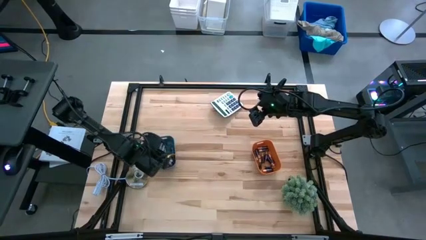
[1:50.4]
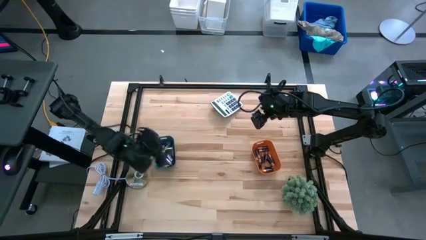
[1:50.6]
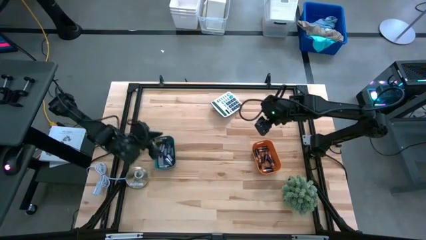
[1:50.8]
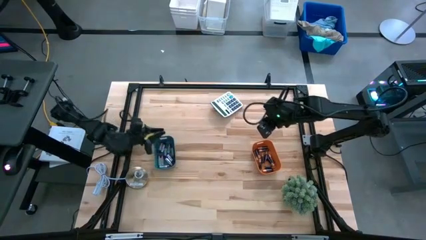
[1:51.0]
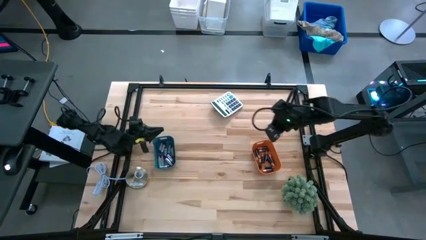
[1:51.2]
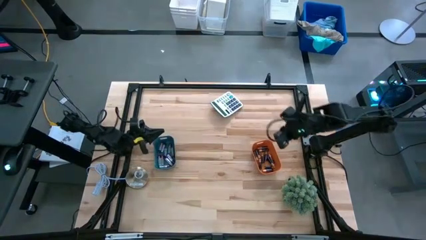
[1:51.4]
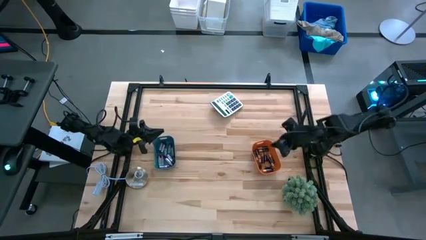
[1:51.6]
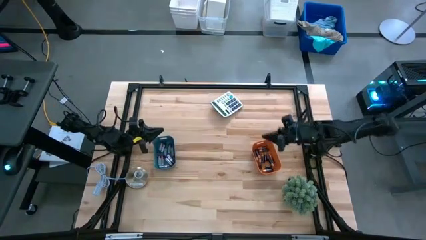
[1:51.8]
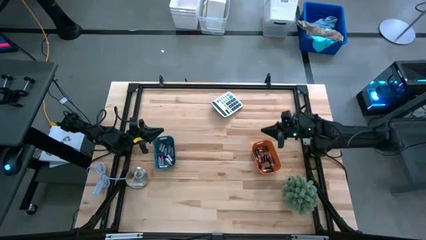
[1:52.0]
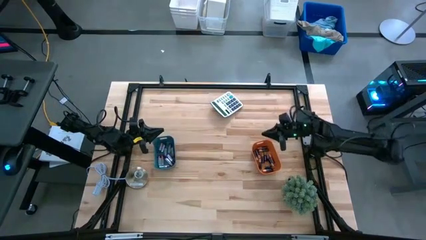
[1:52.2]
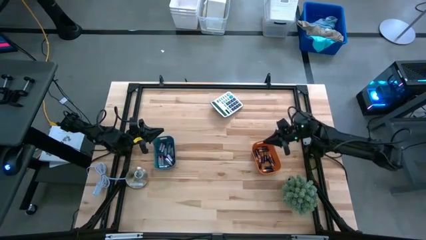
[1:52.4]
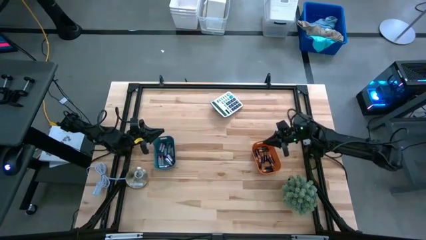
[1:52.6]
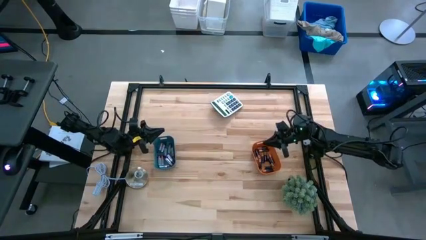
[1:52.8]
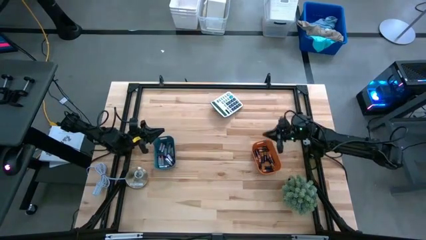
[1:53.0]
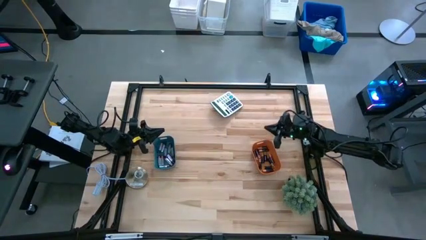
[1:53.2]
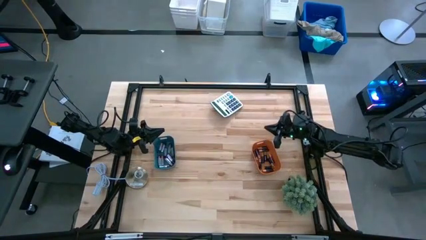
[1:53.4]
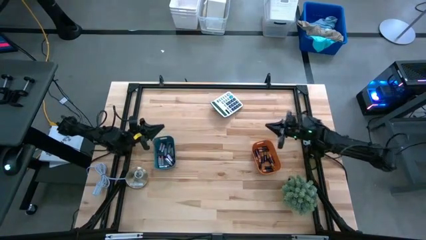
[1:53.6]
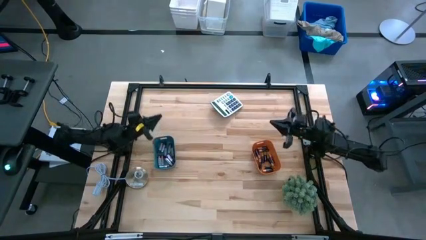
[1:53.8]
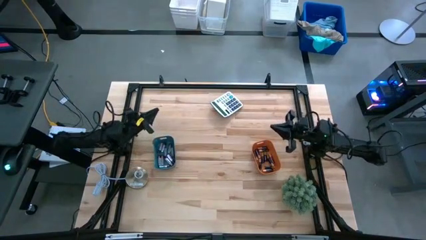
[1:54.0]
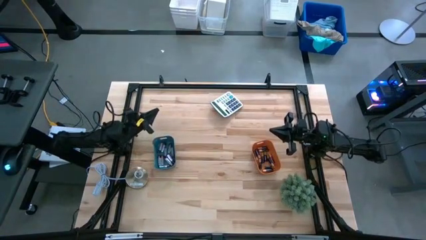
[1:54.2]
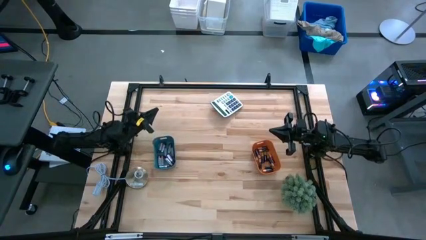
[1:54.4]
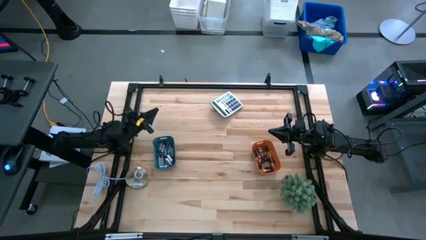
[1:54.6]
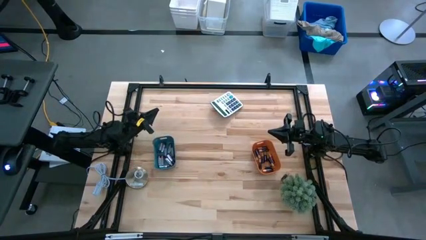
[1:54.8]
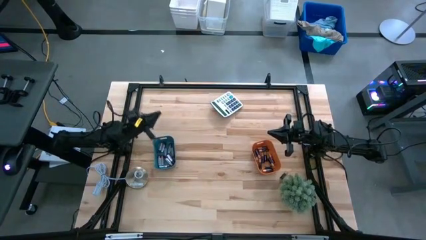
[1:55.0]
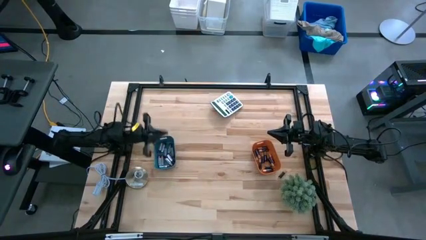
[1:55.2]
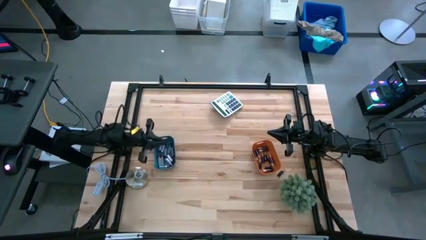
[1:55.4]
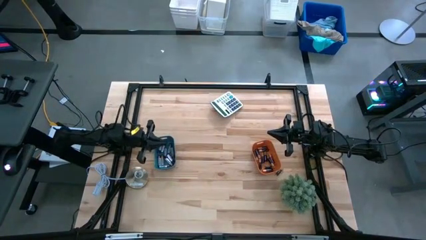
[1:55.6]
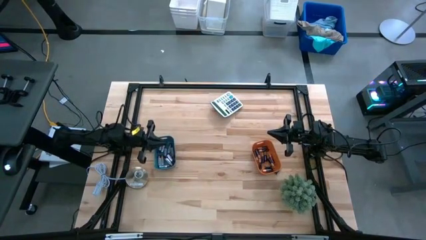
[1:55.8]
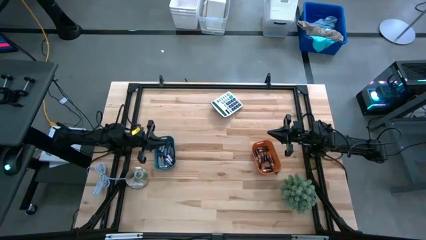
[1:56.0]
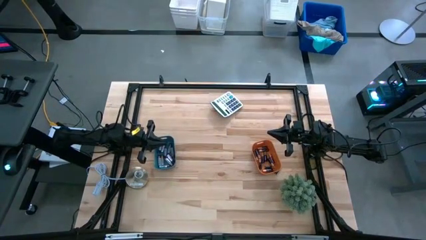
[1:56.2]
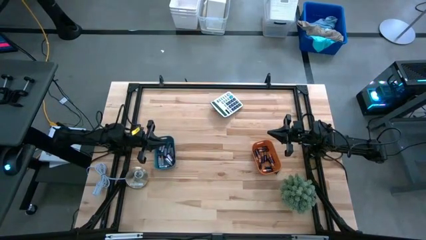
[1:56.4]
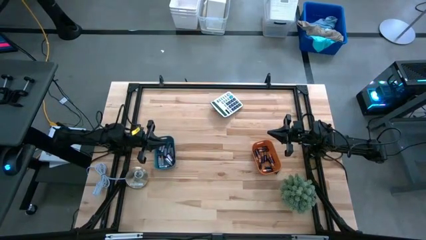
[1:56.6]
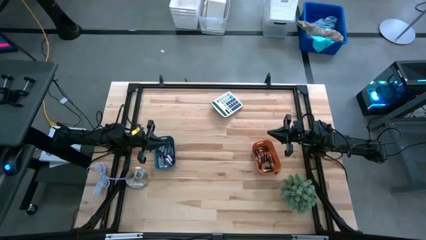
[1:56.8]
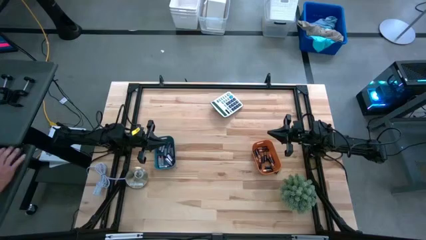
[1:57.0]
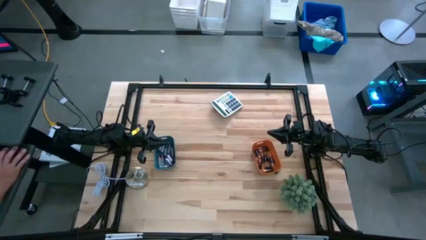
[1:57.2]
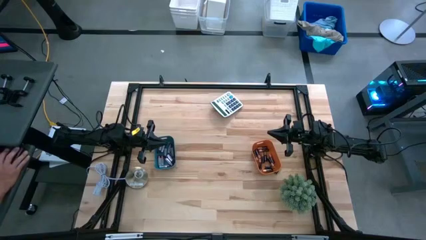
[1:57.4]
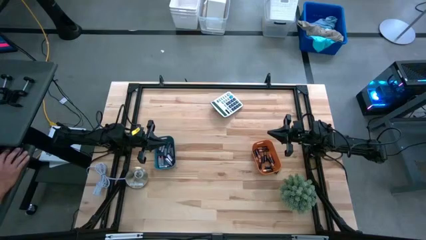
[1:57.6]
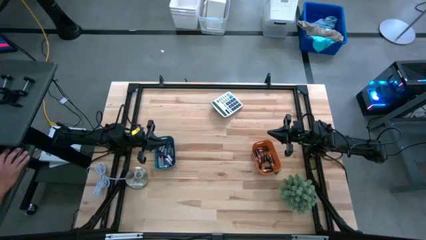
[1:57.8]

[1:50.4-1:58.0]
Task: Sort batteries
Return to Home Position

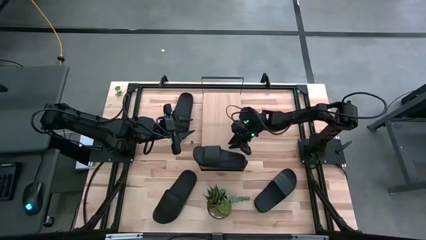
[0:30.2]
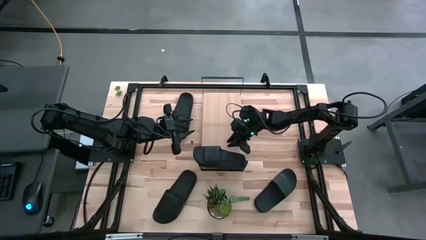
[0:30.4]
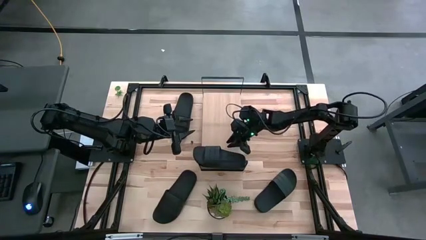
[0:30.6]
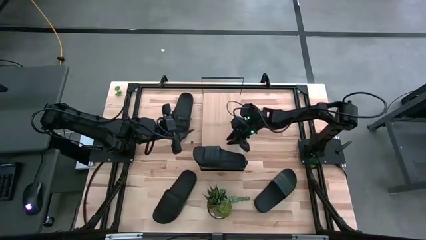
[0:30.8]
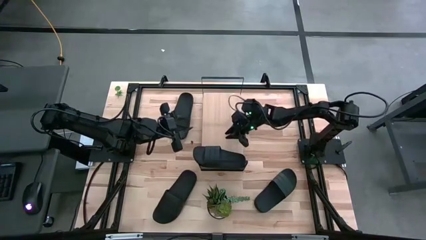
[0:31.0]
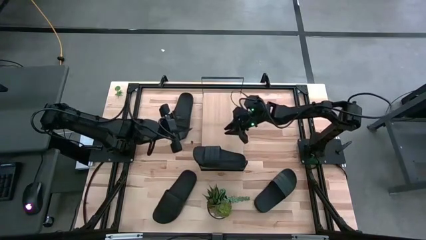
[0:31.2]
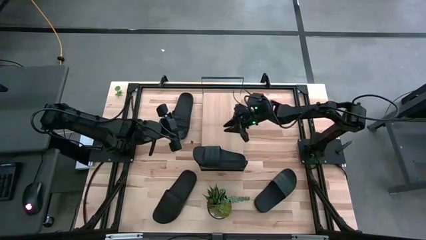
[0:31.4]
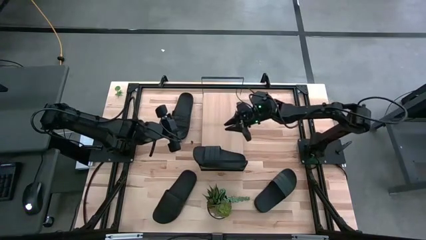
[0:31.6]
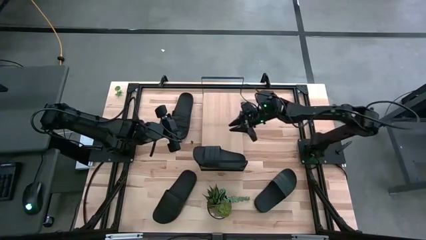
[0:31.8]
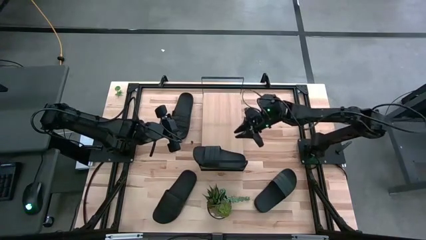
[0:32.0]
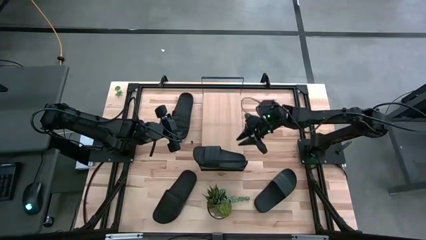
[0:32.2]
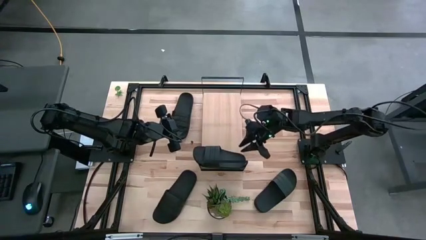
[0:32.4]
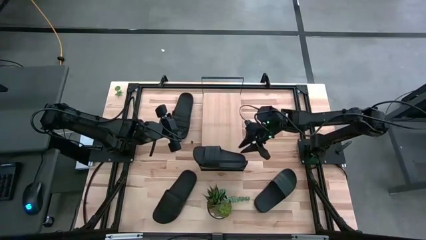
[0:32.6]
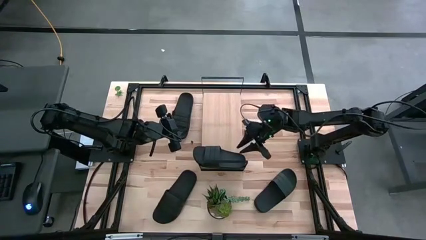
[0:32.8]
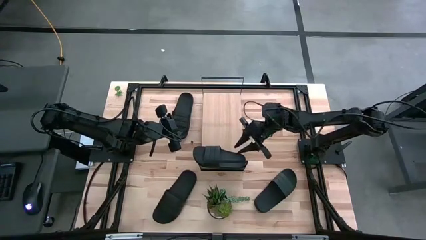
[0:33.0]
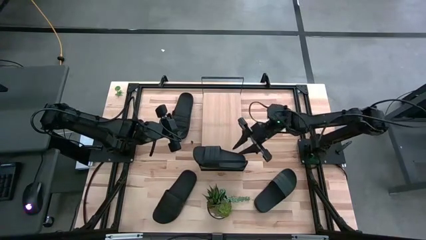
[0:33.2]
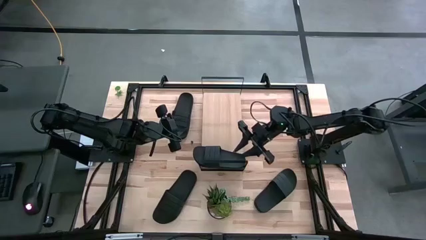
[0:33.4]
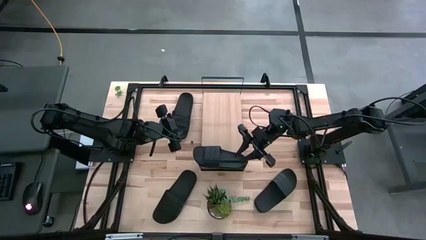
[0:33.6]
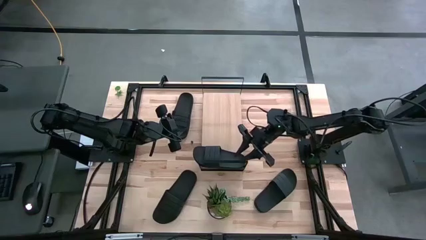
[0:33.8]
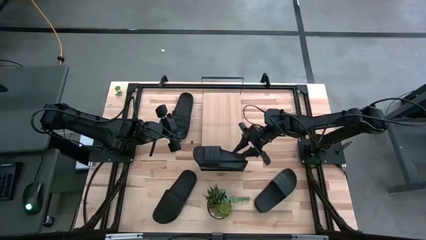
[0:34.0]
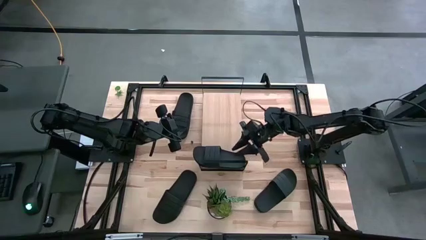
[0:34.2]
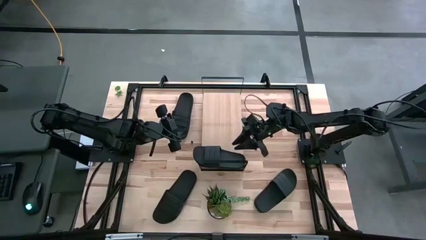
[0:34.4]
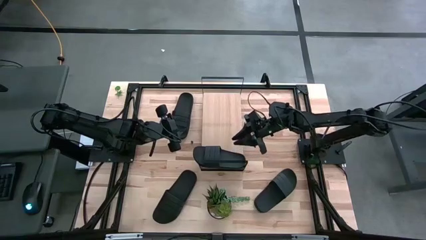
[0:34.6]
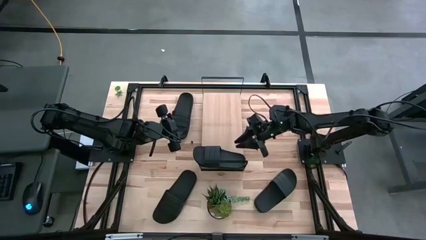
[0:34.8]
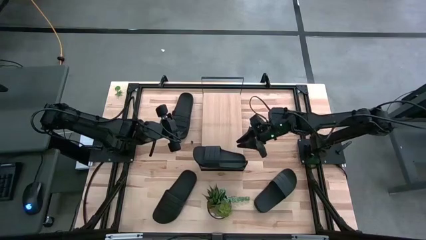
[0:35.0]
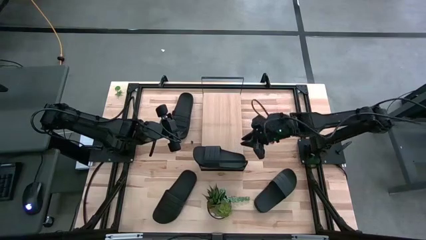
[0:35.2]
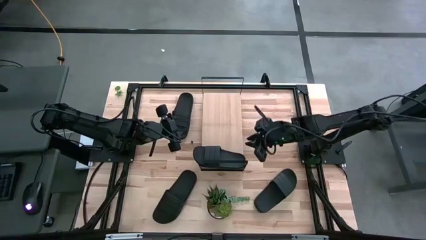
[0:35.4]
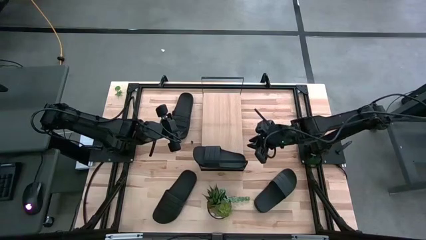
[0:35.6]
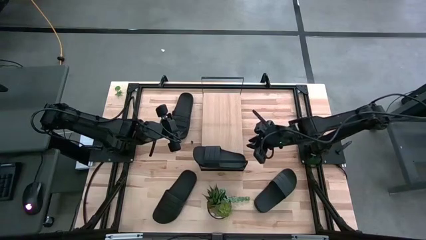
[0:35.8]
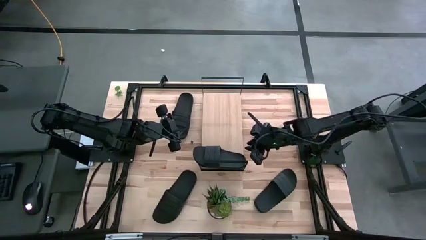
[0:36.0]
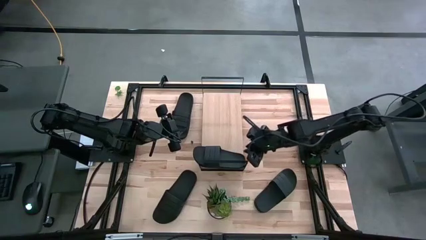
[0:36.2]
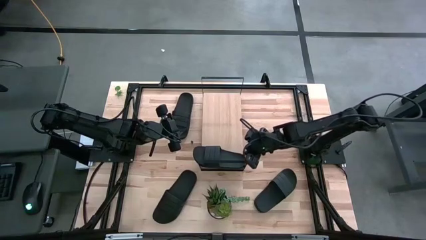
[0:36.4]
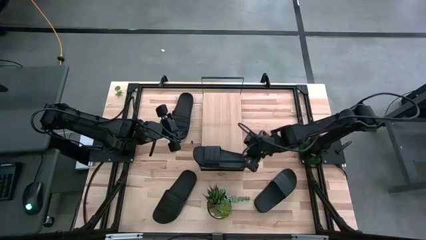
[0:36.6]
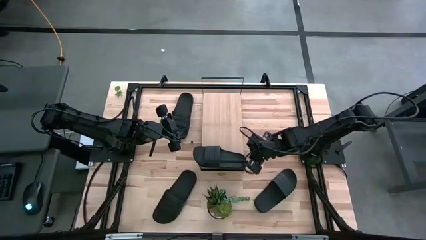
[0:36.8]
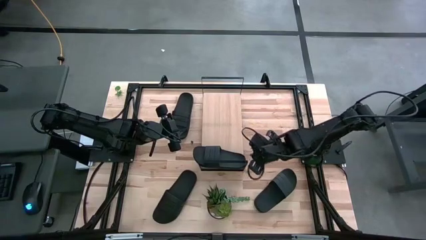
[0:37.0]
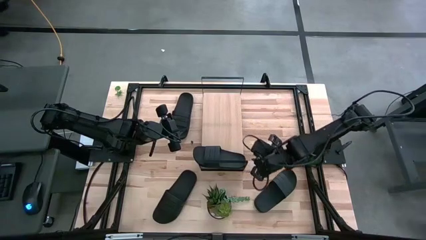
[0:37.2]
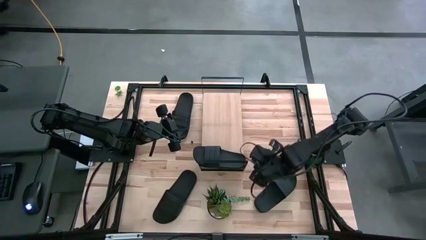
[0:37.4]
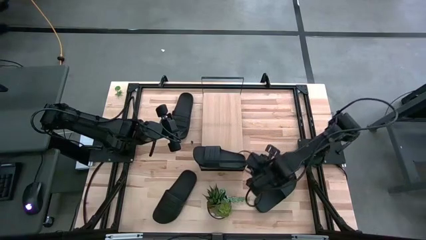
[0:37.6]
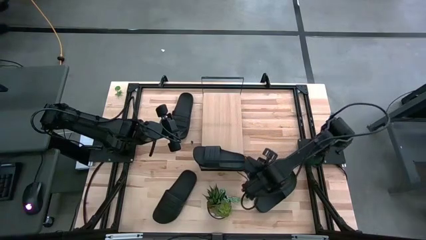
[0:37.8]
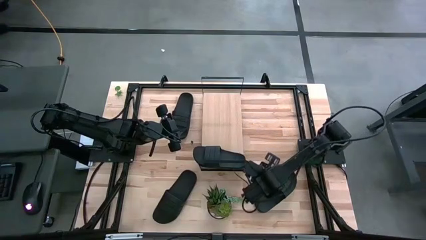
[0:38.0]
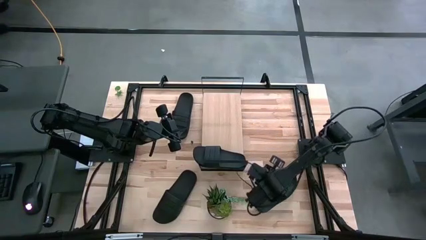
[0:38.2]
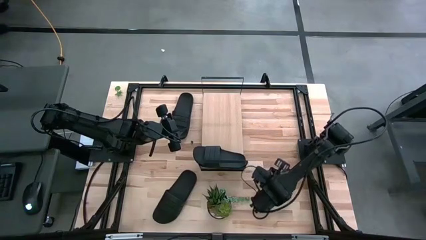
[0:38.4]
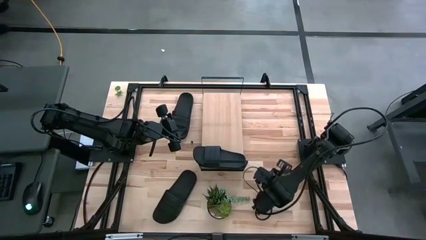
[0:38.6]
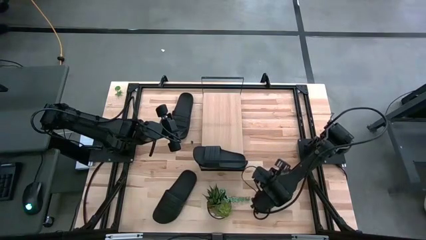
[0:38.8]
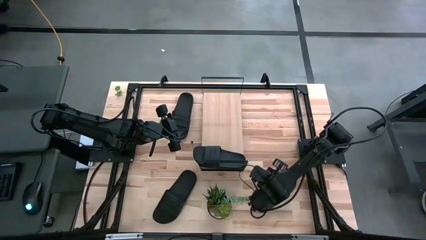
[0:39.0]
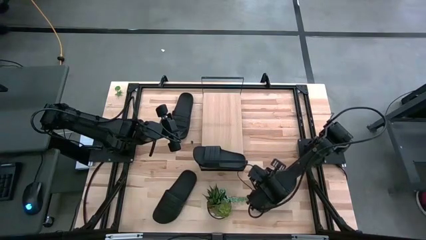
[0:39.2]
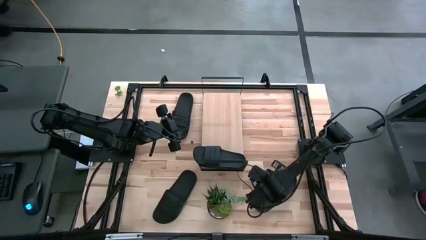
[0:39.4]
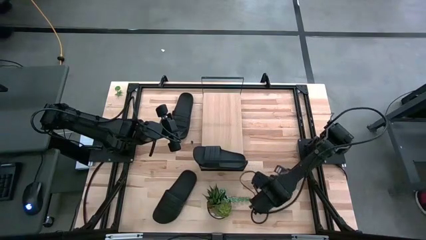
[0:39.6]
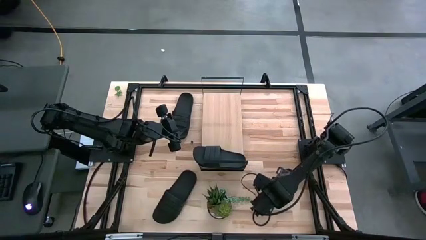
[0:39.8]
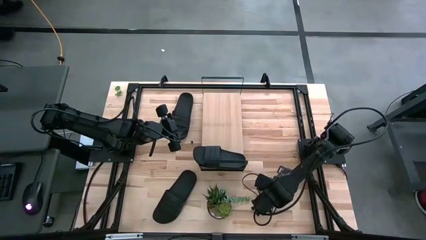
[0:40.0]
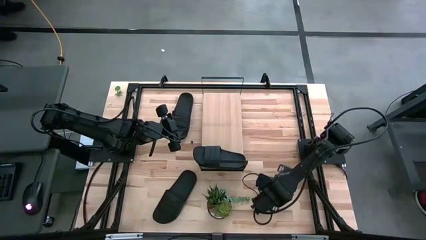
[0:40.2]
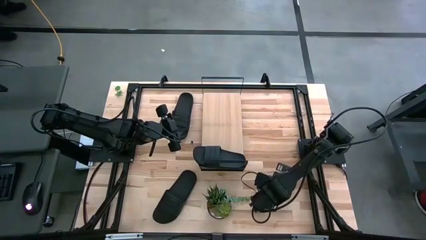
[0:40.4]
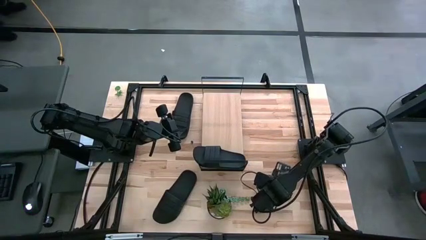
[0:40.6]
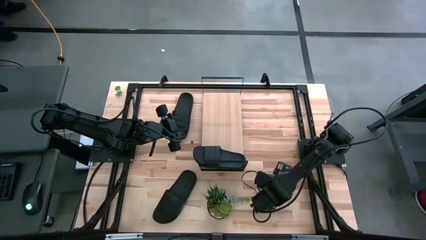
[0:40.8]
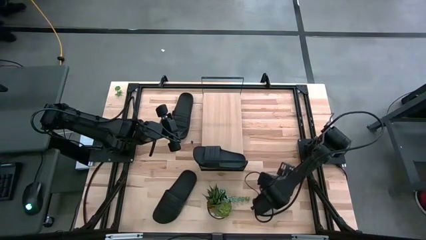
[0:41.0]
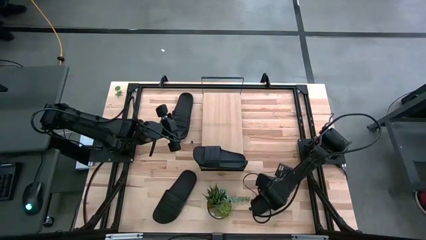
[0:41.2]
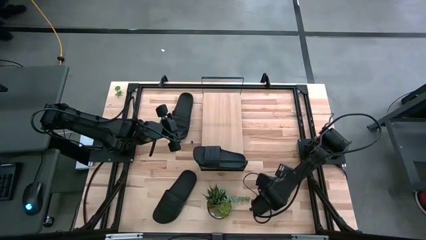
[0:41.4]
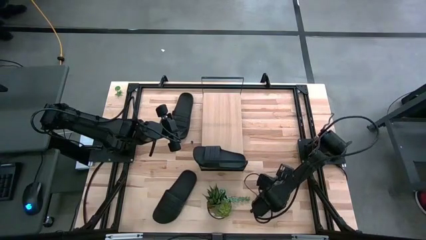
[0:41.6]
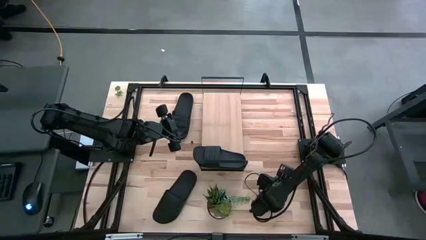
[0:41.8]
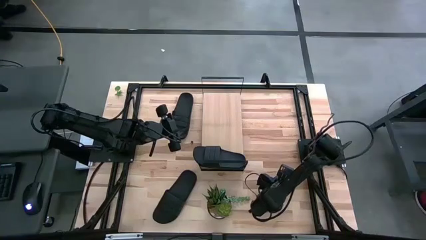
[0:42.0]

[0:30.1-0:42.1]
Task: Pick and place slides into the shelf
Put the bottom right black slide on the shelf
